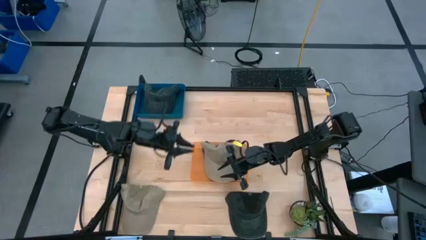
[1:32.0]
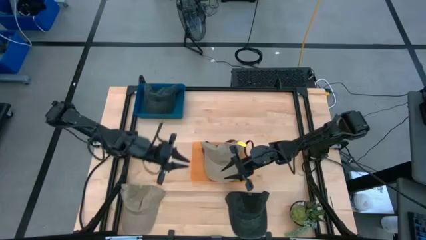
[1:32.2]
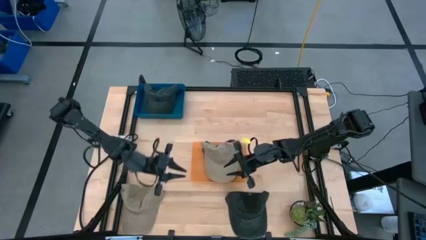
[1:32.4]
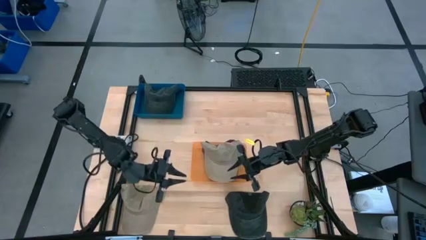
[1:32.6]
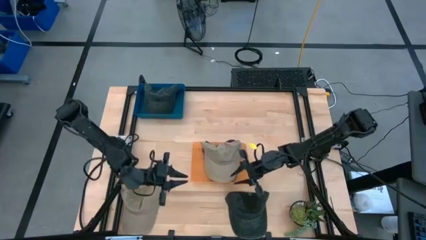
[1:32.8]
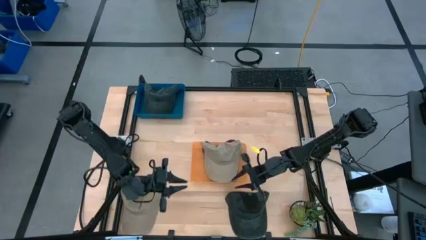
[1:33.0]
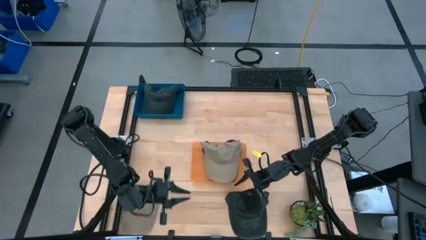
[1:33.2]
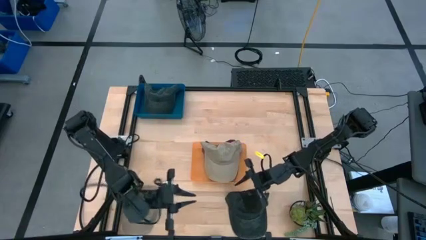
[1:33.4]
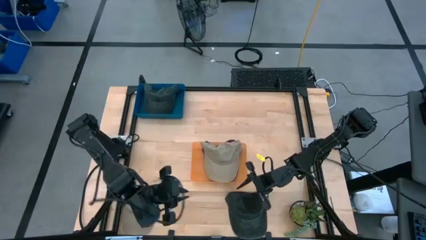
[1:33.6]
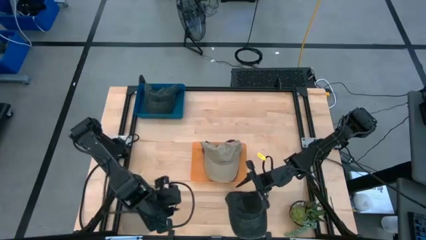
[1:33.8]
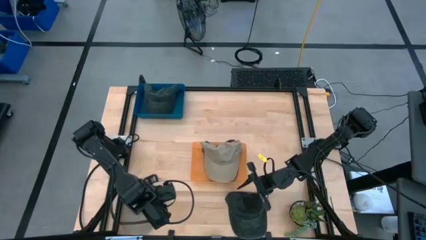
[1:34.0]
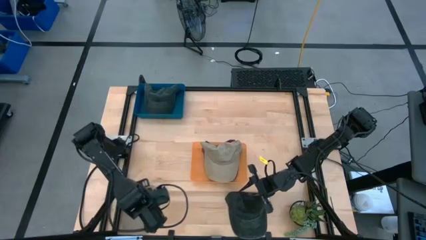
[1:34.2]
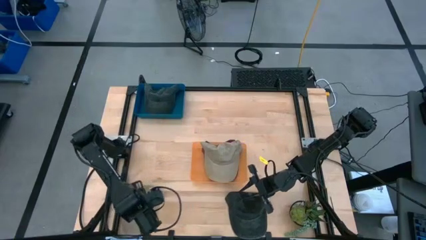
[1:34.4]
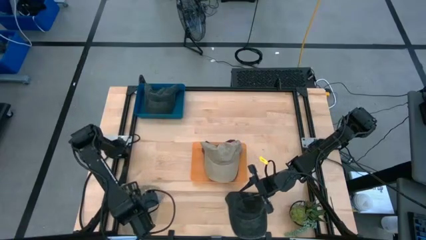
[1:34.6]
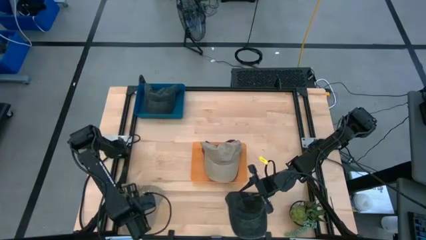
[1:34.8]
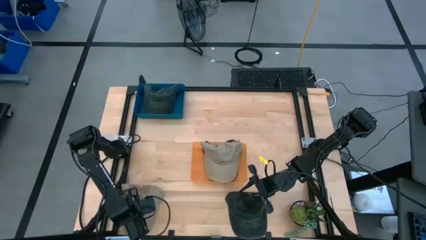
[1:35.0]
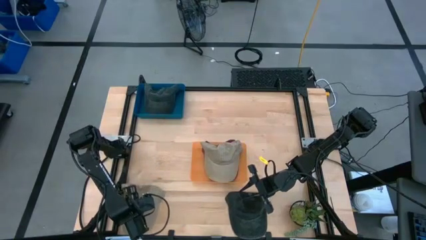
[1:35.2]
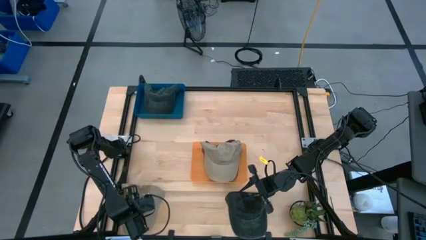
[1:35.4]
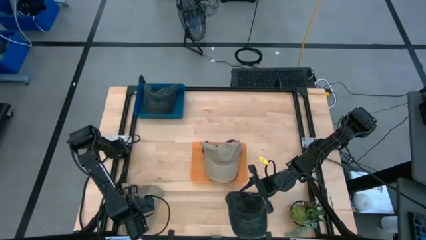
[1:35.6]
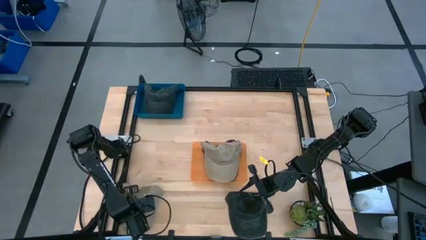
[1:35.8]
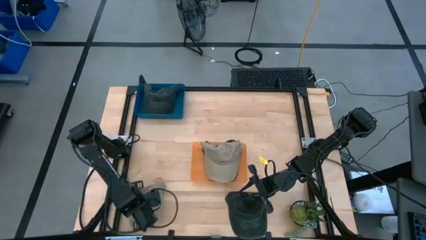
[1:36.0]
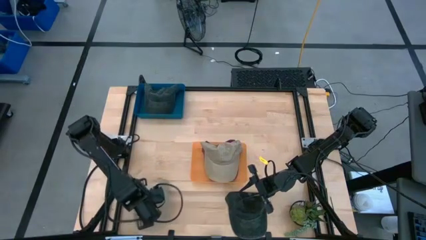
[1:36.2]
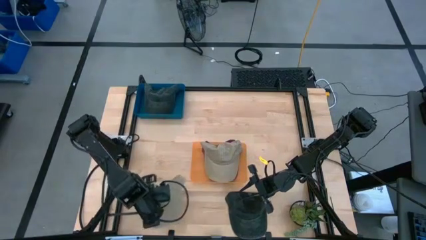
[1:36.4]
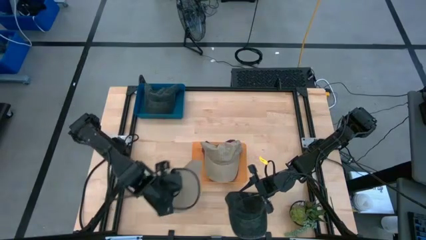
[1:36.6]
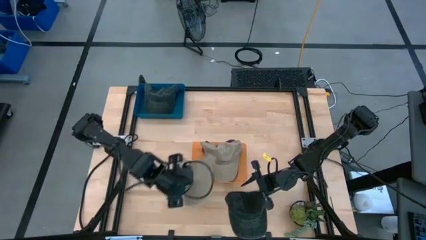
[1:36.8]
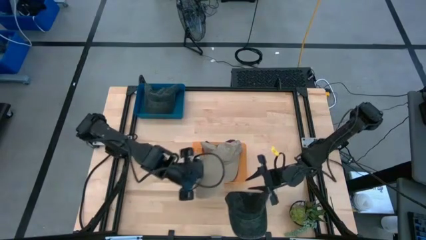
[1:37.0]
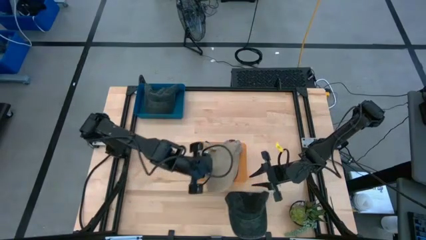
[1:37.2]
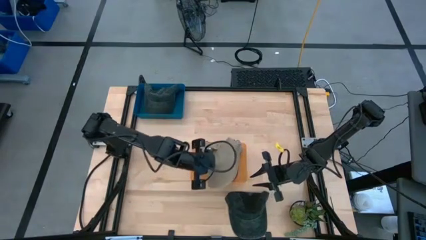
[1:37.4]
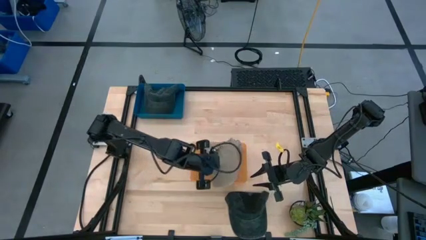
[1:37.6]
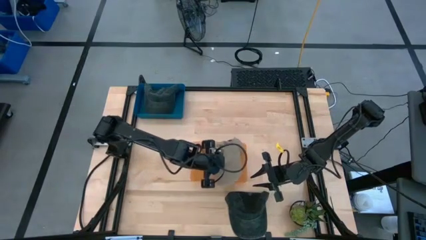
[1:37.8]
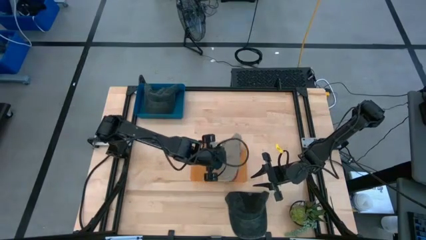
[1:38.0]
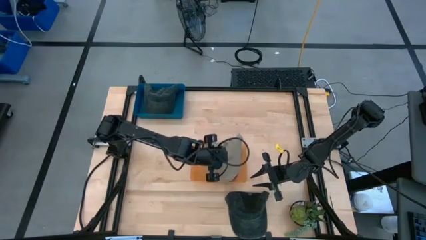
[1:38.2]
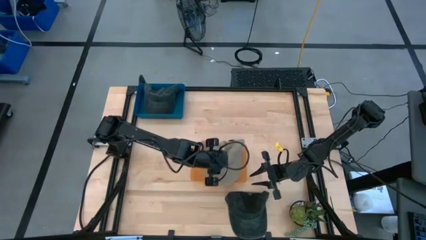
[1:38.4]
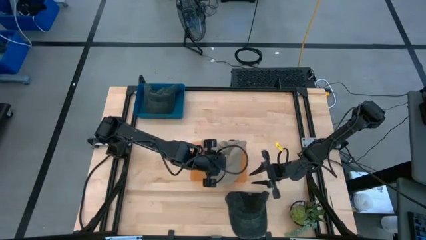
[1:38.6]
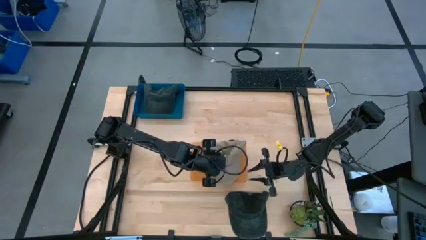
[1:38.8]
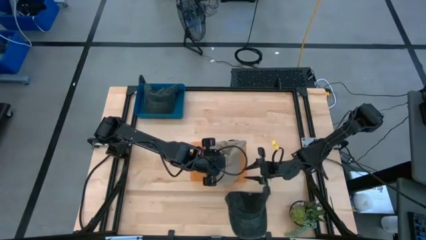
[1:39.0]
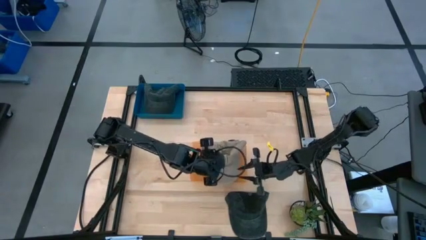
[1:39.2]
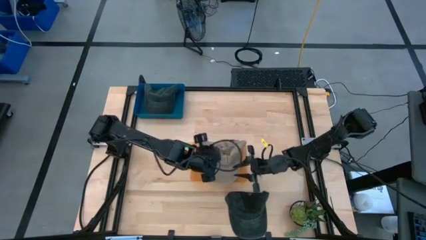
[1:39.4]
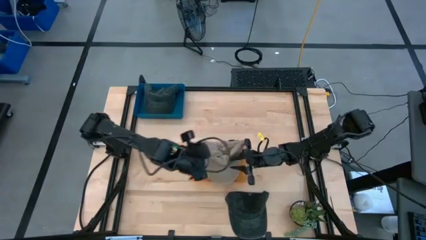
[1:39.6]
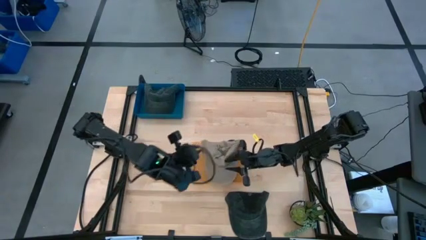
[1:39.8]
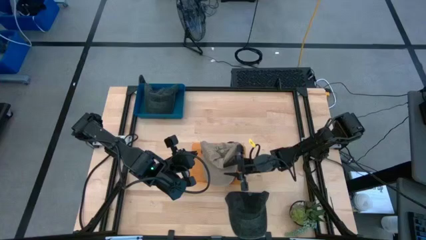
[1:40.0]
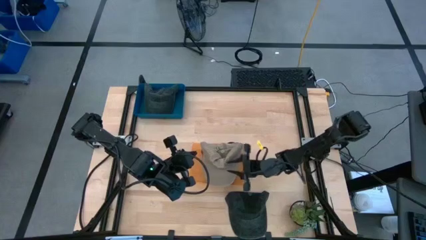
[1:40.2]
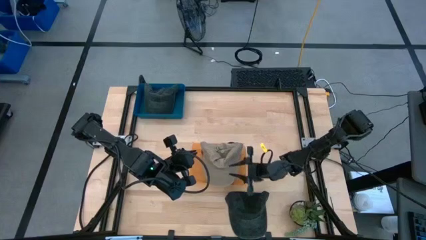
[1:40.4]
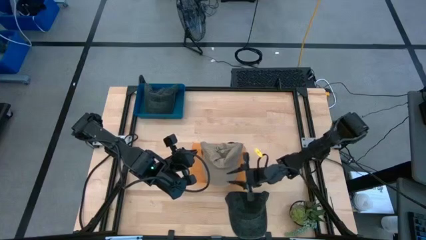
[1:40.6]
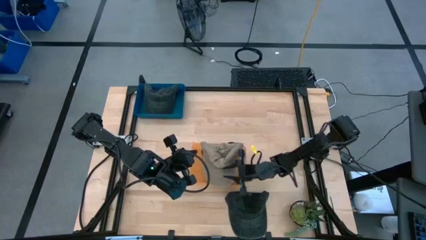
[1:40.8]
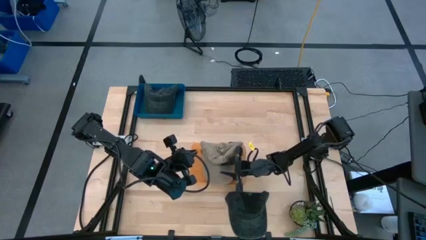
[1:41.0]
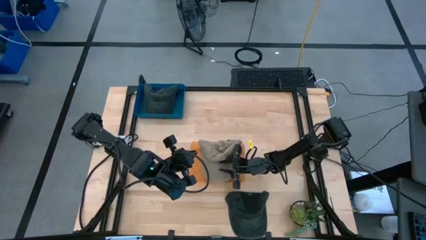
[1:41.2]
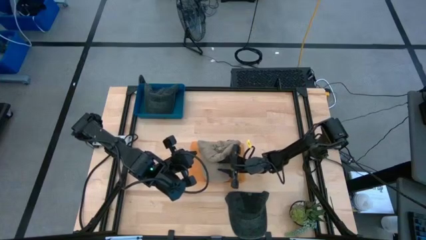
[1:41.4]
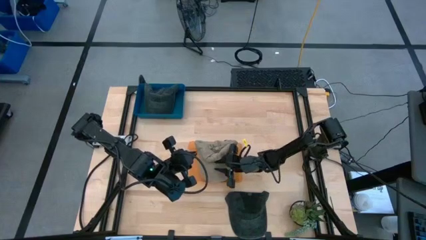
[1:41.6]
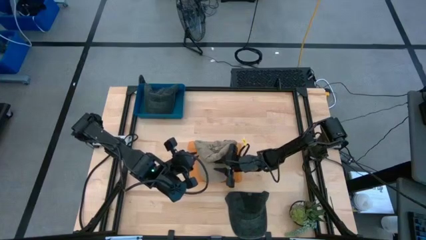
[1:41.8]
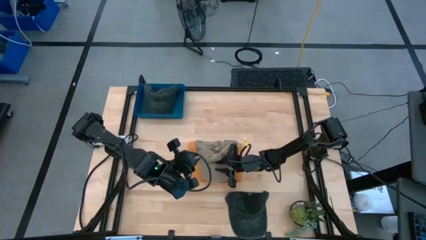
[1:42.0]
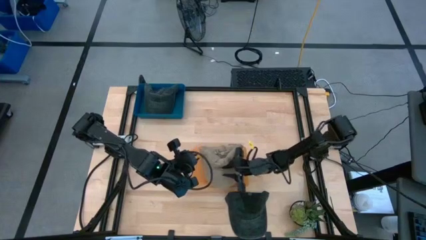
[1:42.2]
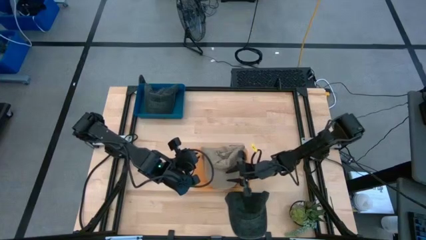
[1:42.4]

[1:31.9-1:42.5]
Task: Pick & Place hat
Put the brown cap into the orange bin

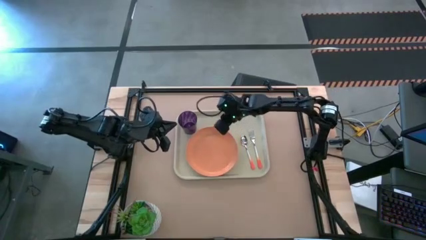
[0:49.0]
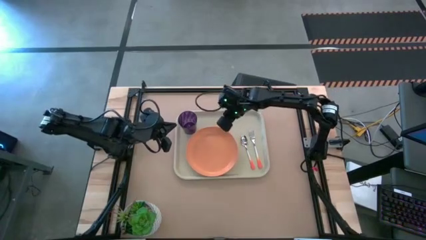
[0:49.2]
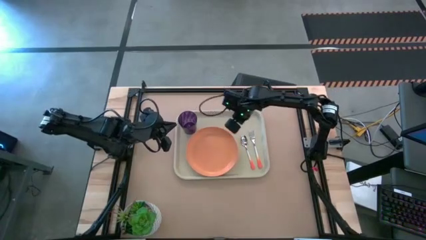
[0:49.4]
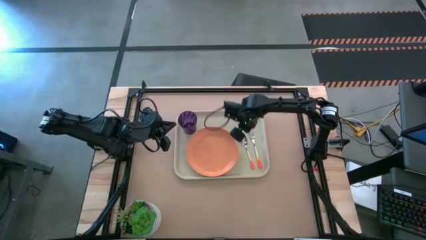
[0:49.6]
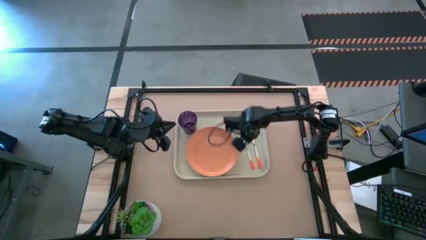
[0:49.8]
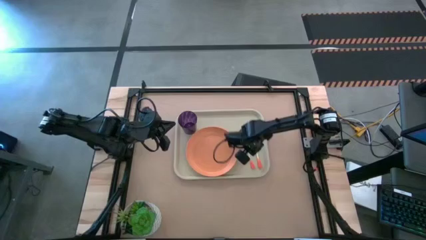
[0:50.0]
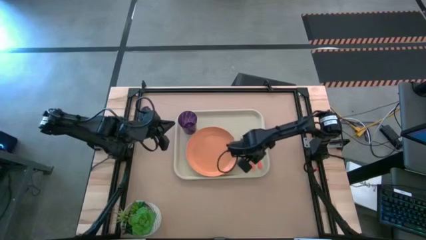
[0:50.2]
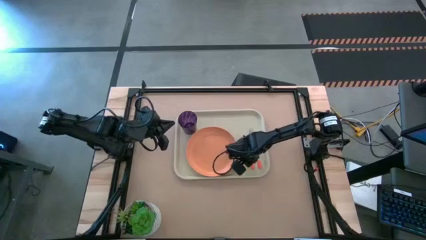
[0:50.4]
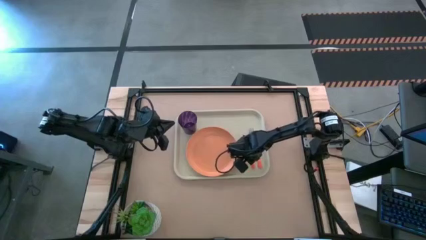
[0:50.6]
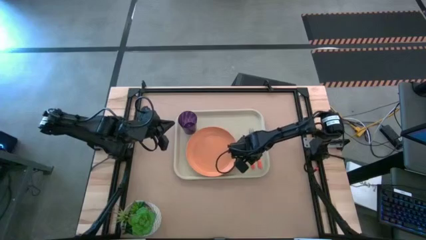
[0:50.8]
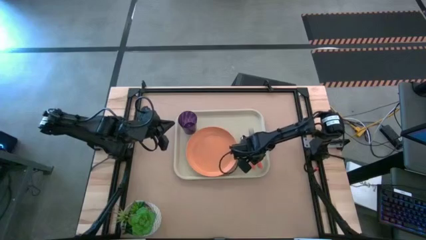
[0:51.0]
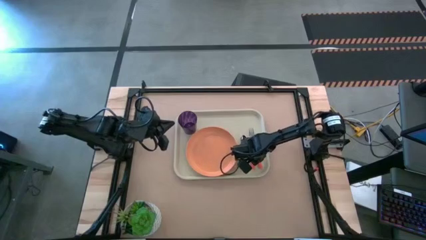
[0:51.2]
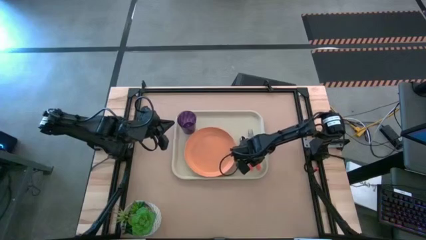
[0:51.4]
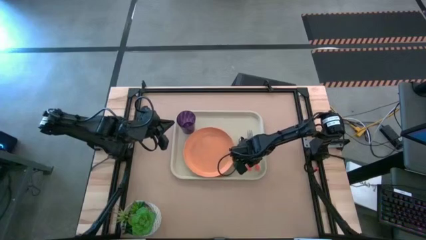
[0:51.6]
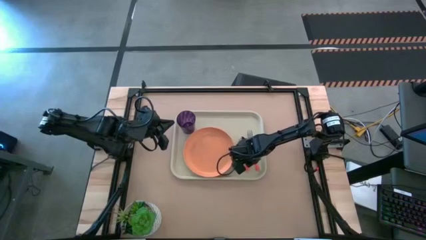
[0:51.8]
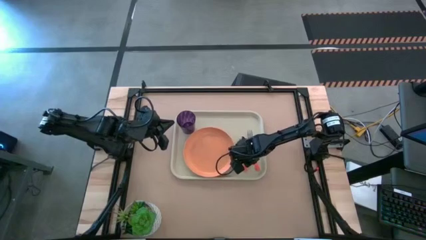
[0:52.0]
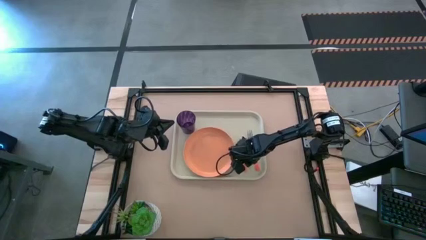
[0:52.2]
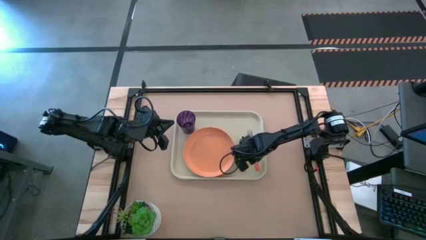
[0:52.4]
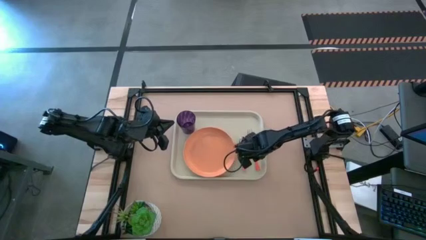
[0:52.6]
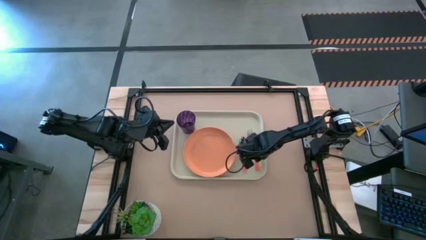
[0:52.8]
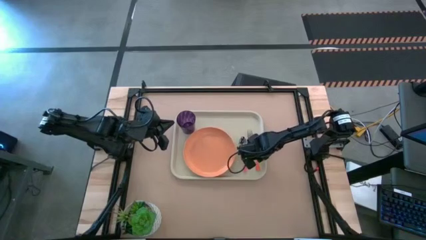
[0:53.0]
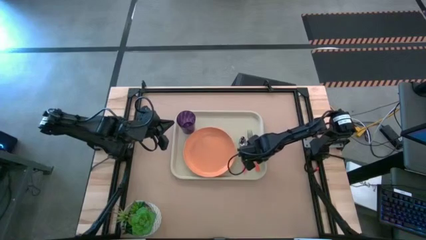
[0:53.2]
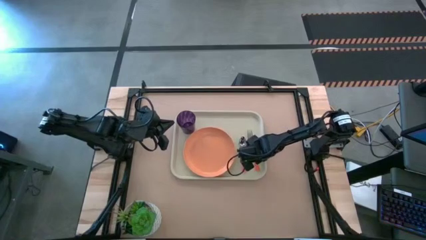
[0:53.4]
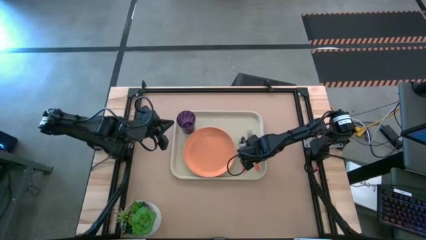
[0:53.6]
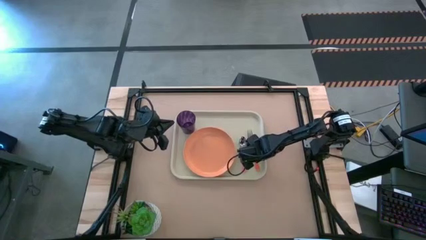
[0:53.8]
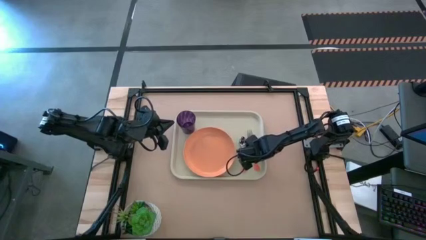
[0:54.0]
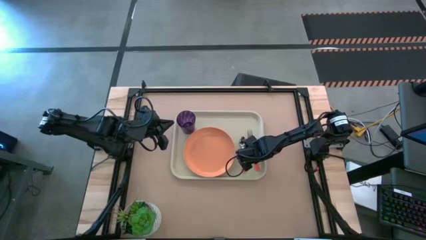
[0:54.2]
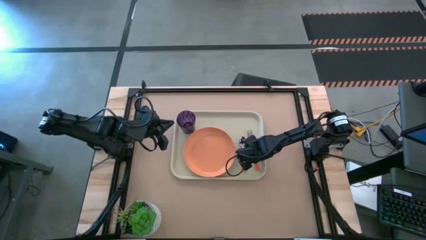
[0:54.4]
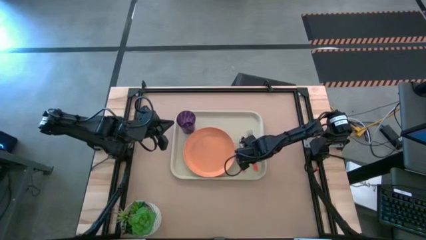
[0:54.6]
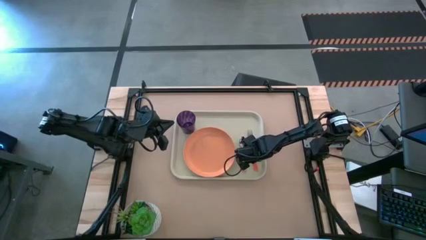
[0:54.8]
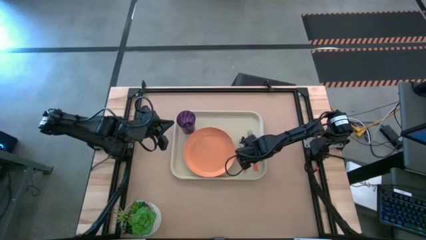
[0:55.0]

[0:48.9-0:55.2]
Task: Pick and place plate/cup/fork/spoon on tray
Adjust the utensils on the white tray
